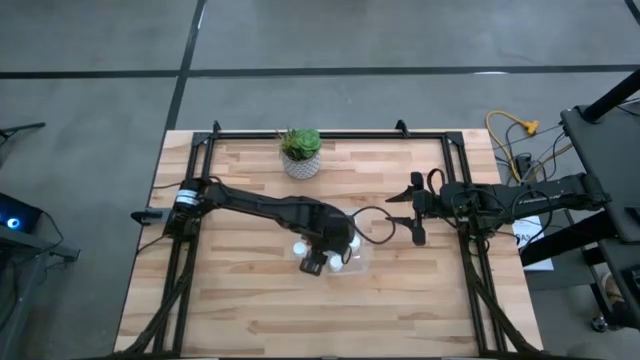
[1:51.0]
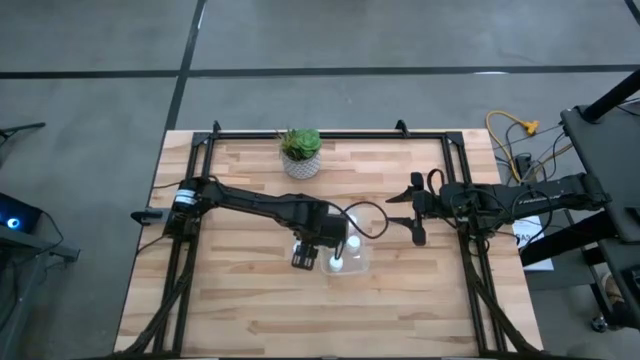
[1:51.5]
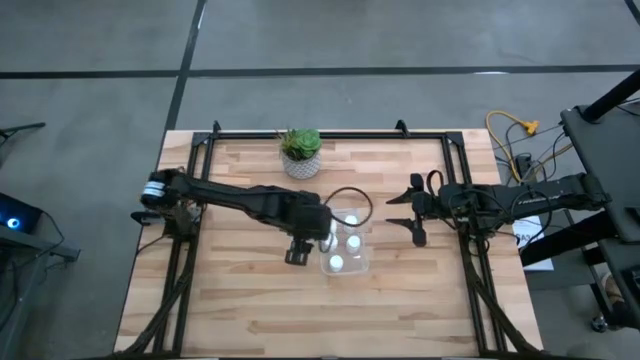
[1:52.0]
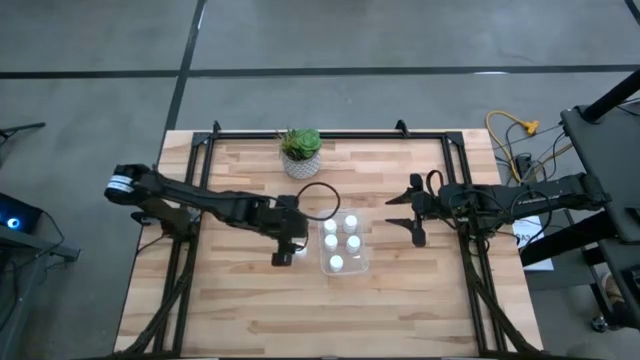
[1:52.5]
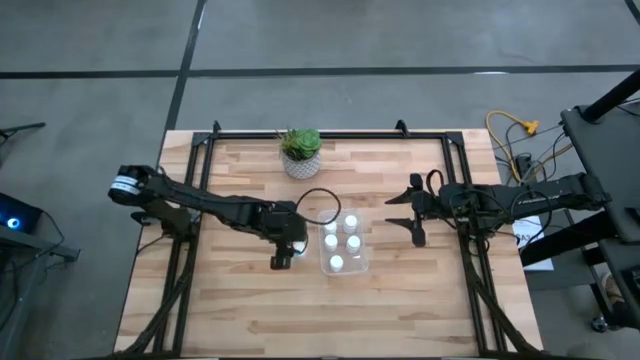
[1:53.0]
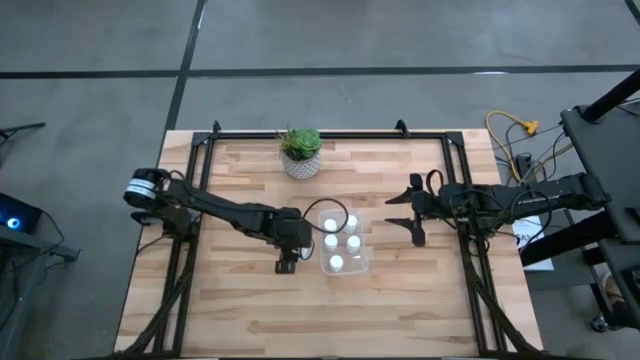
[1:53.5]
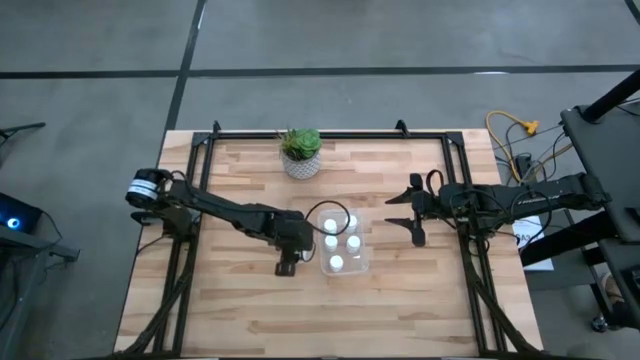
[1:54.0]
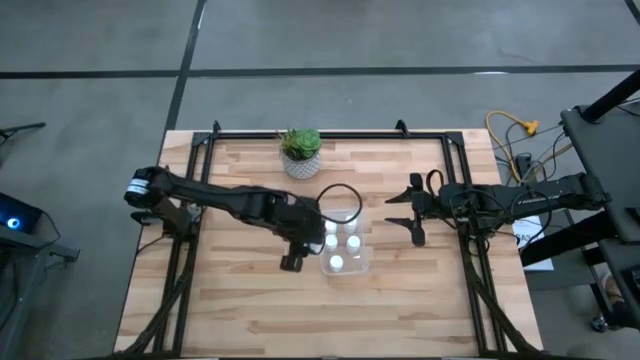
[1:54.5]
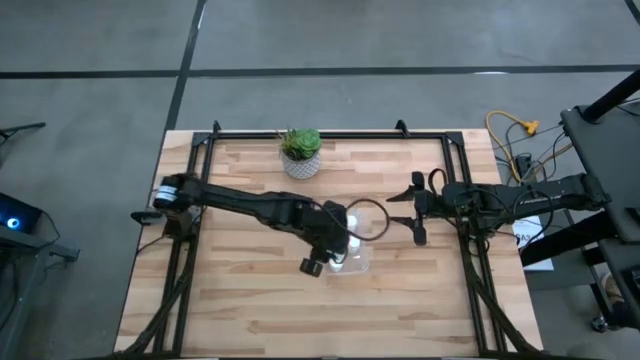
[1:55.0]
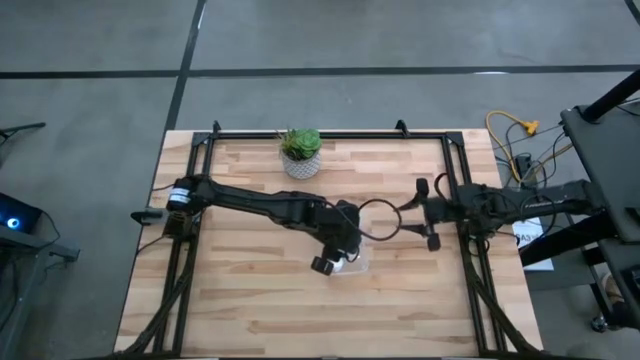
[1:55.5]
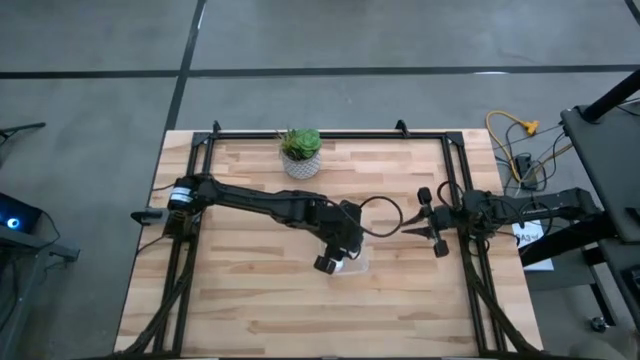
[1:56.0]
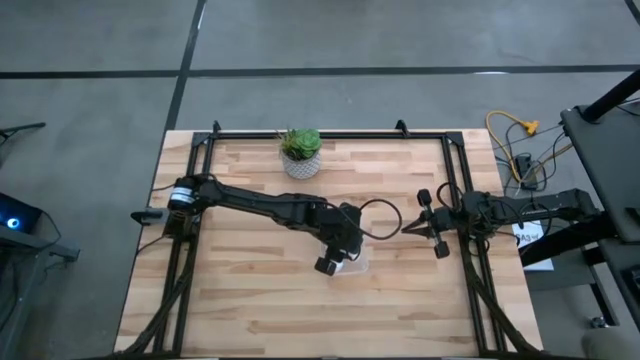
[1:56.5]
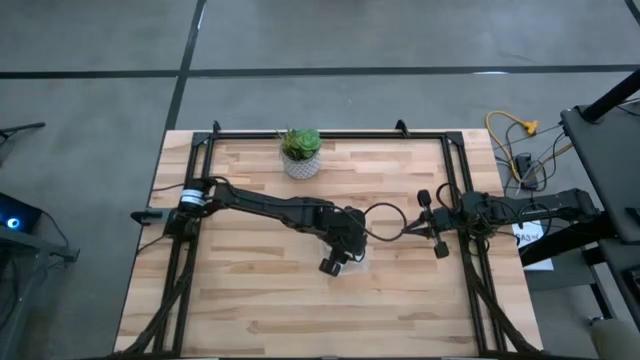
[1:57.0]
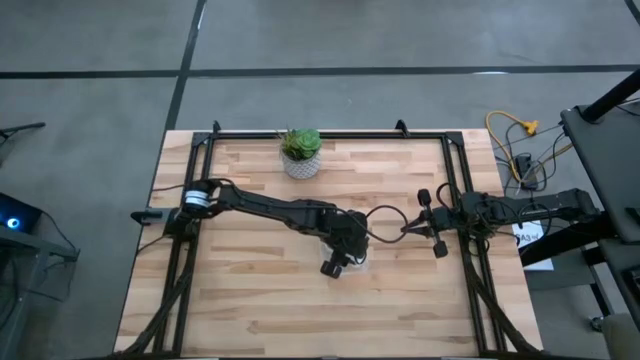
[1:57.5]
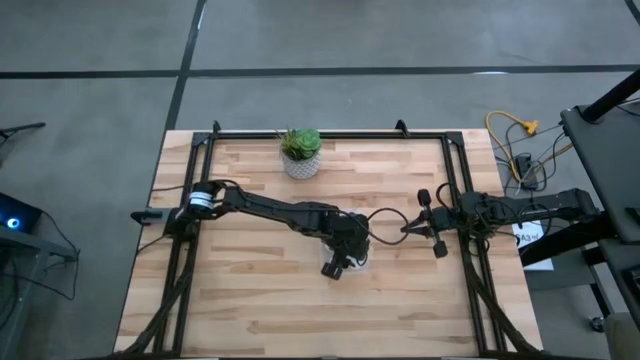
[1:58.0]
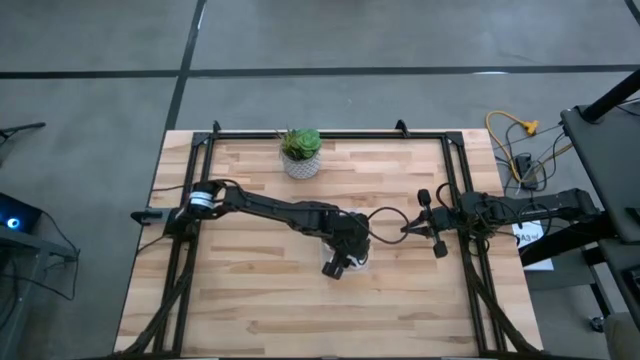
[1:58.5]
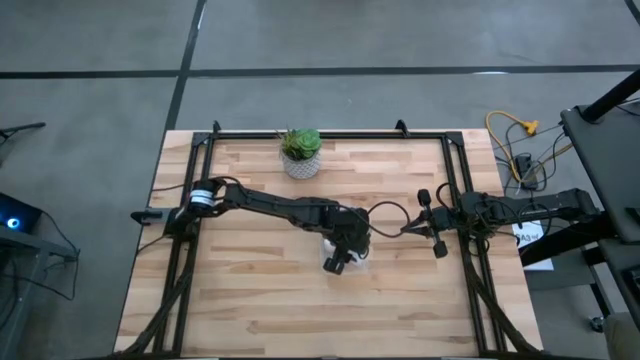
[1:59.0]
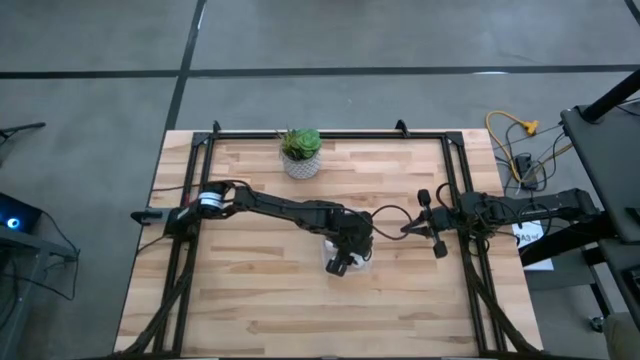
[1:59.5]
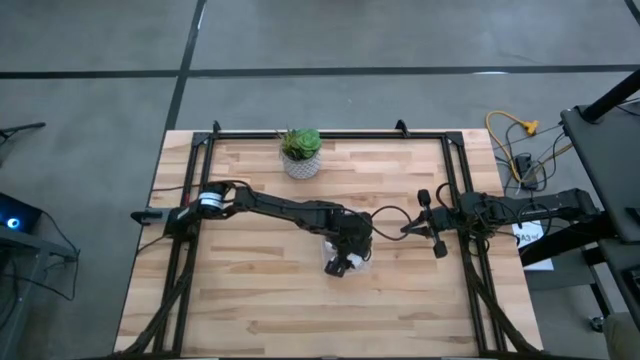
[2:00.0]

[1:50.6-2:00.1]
Task: Pick and place pill bottles into a basket
Put the white medicine bottle into the transparent bin

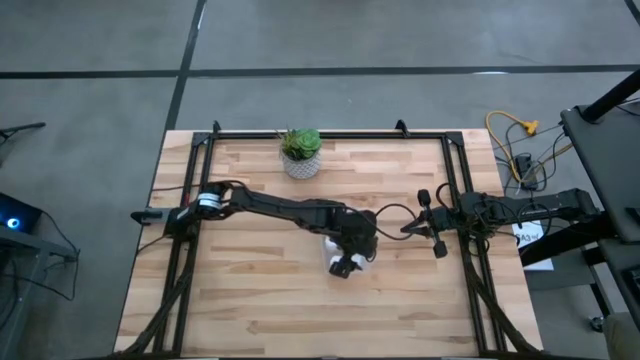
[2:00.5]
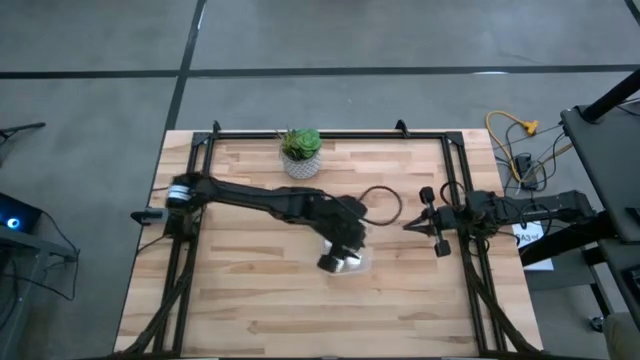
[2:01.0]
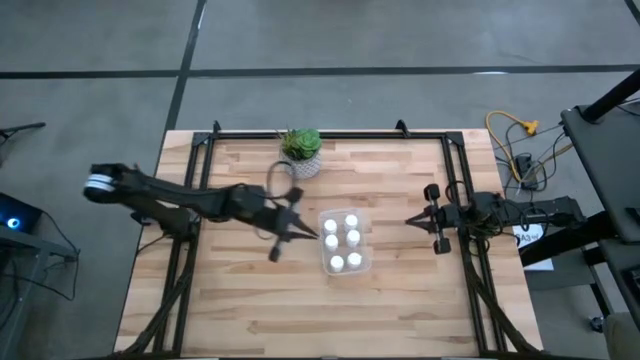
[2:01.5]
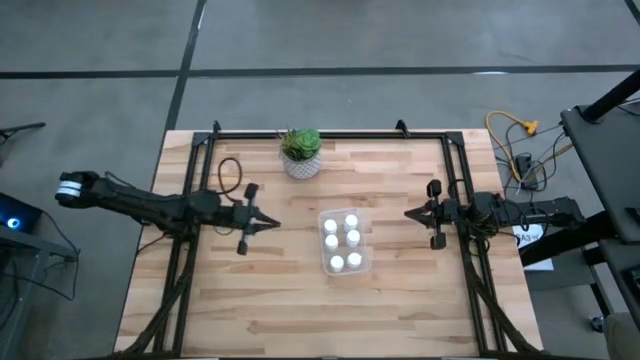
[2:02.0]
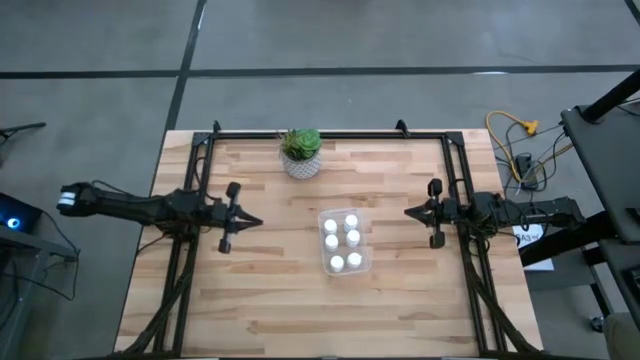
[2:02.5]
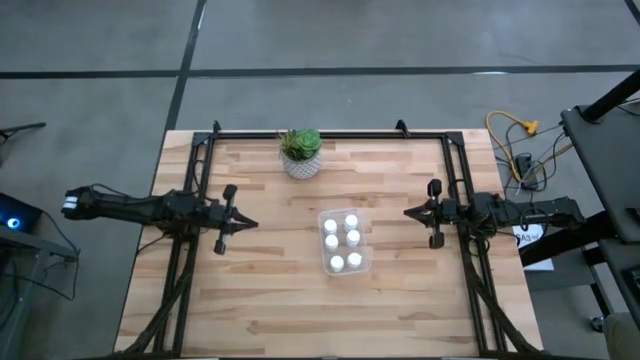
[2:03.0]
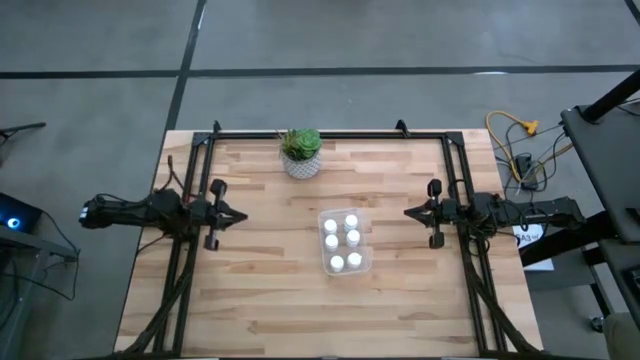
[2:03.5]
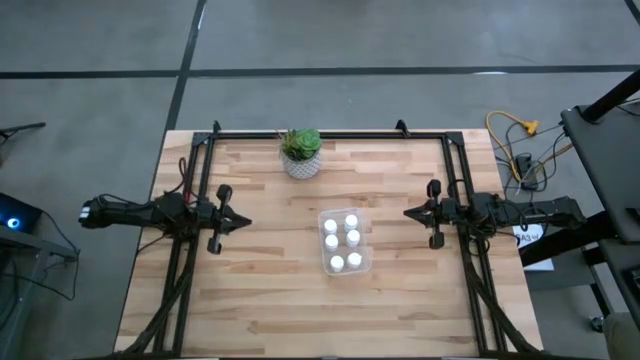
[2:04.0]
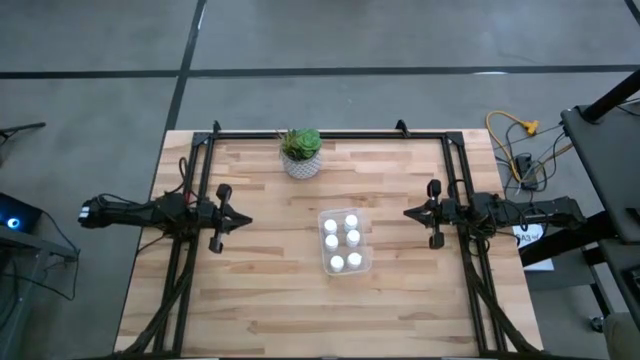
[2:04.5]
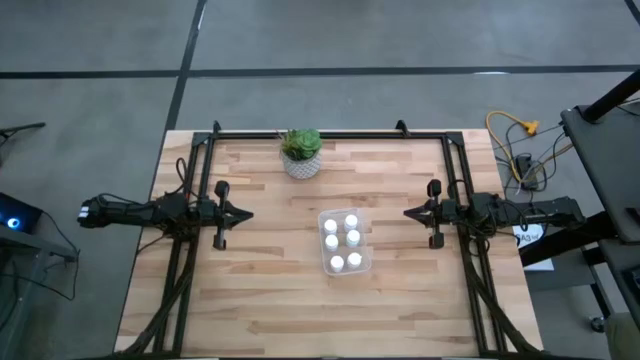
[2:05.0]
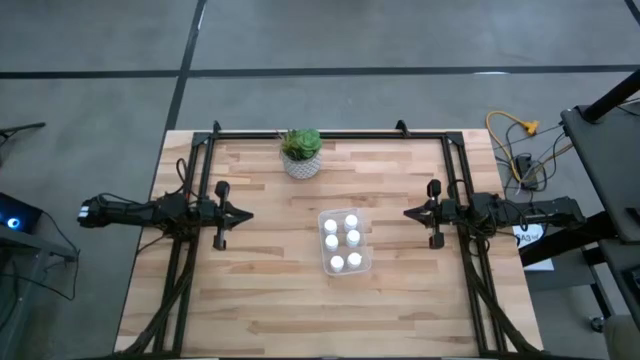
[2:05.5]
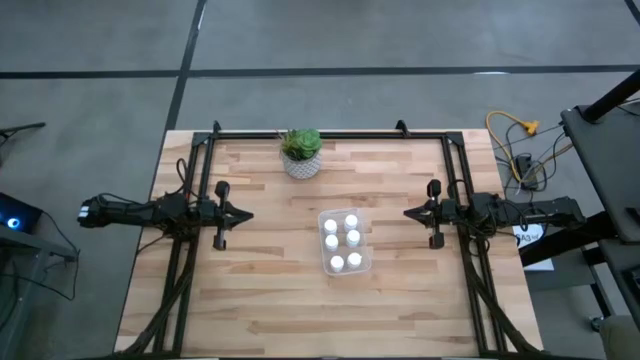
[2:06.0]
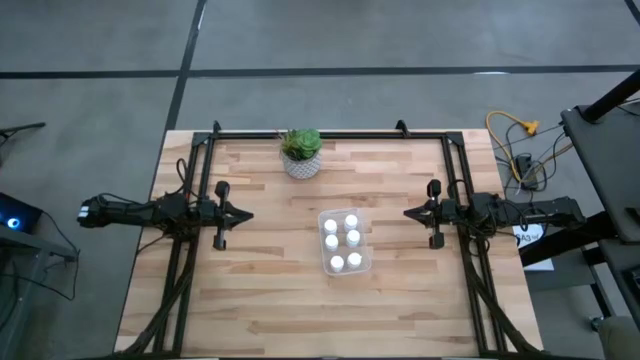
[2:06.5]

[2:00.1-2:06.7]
Return to Home Position

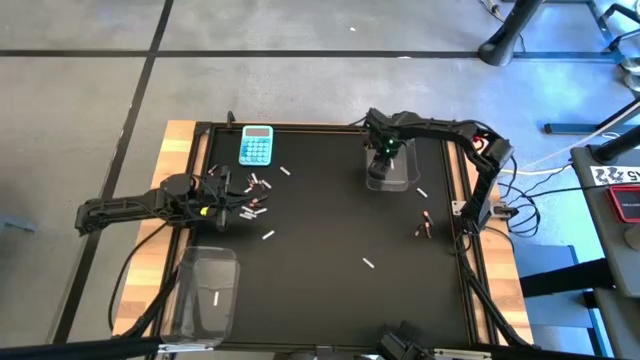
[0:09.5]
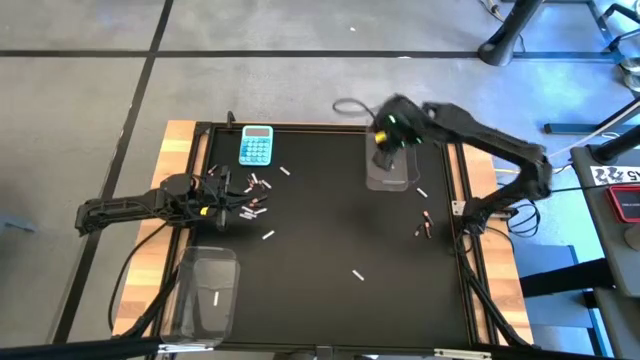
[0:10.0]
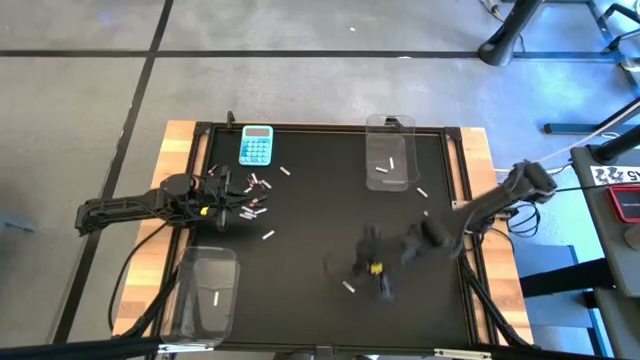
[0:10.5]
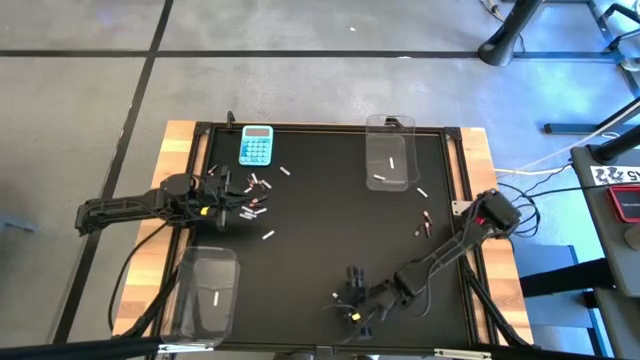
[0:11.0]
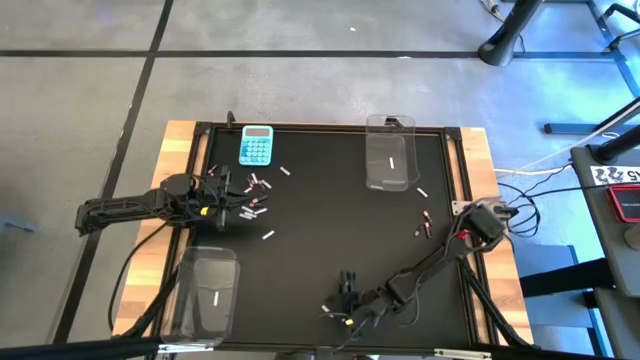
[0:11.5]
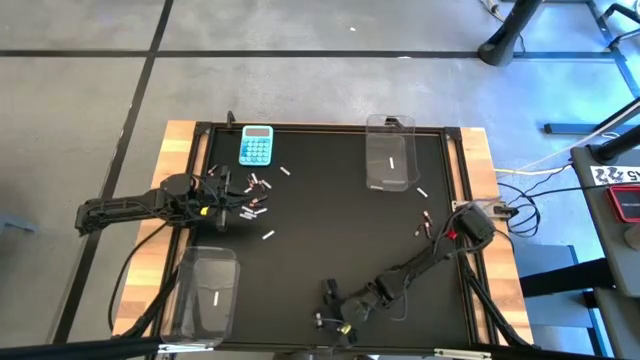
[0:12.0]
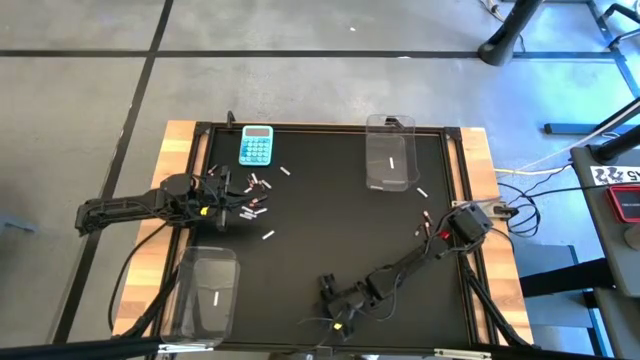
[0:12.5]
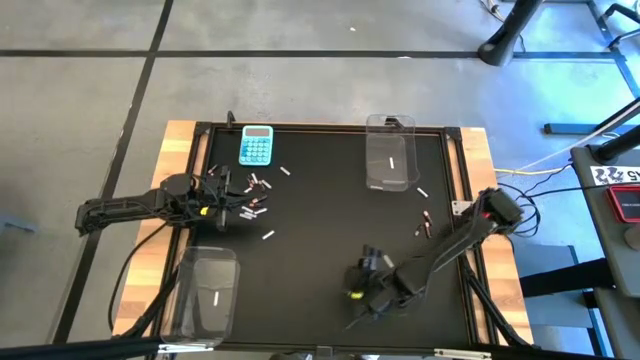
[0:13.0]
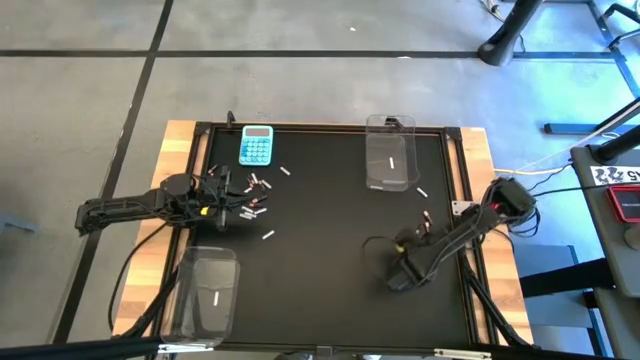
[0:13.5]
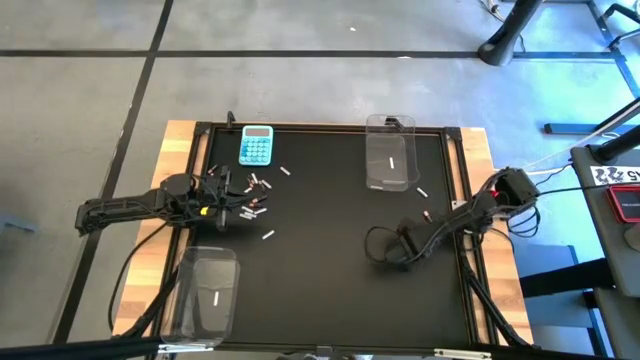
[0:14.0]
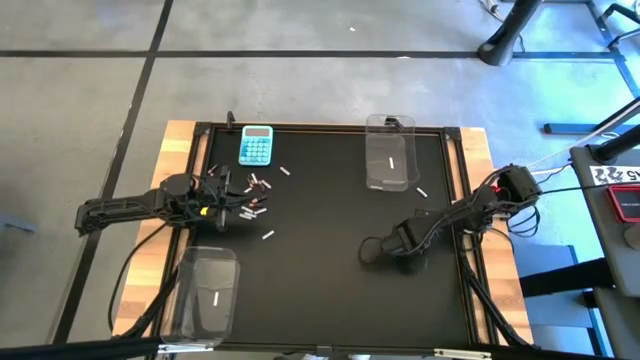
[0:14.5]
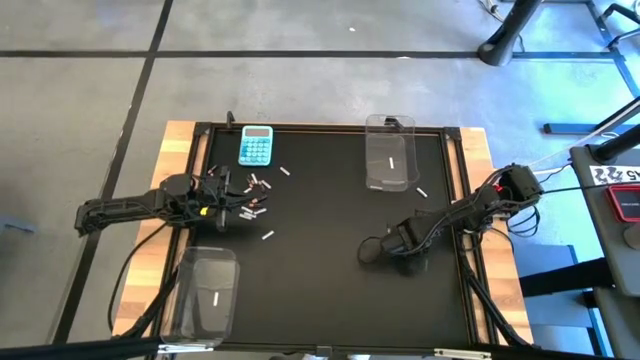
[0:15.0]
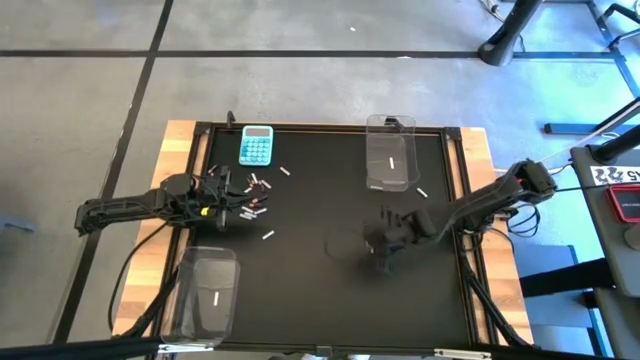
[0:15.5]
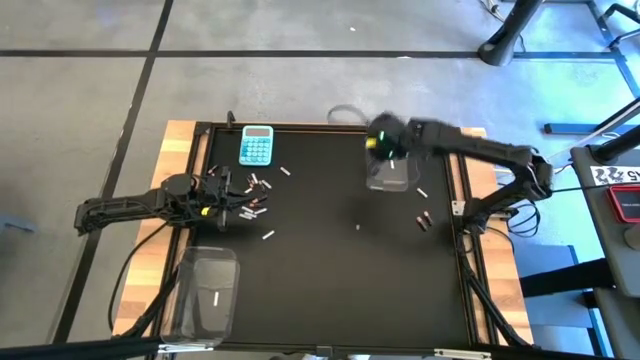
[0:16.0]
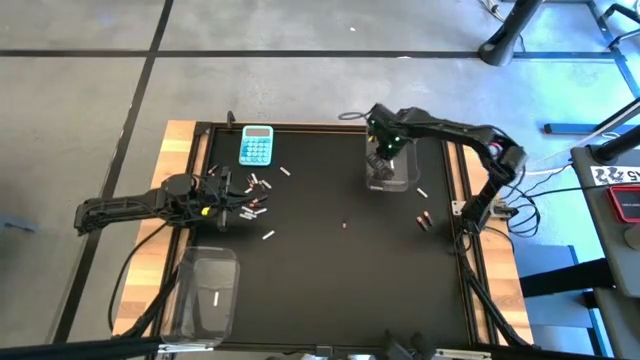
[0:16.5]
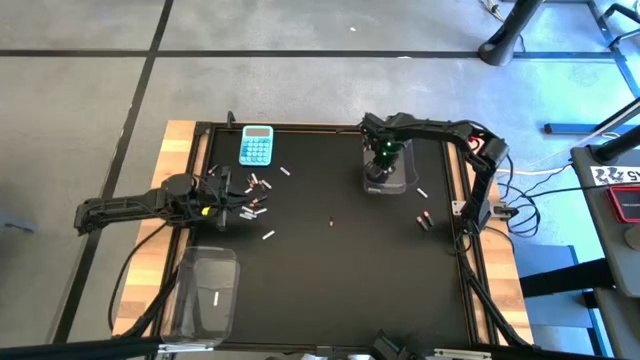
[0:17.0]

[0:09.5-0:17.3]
Task: Sort batteries
Put the white battery into the top transparent bin
